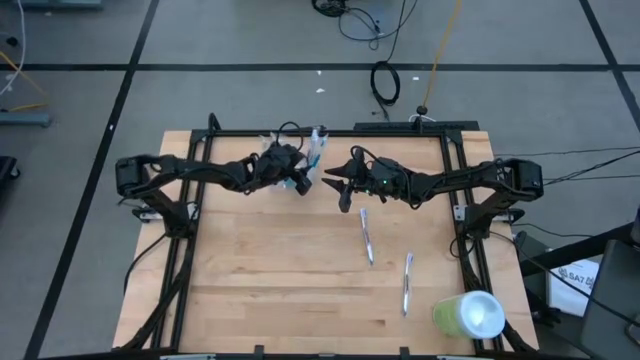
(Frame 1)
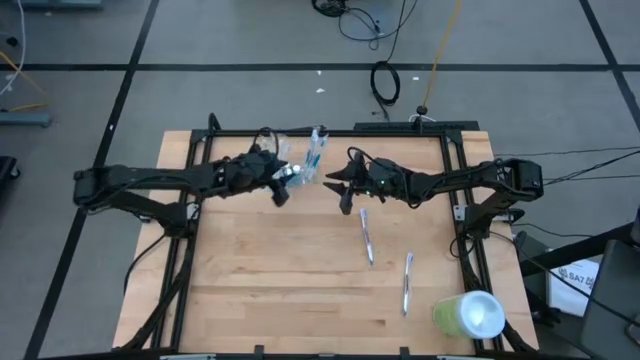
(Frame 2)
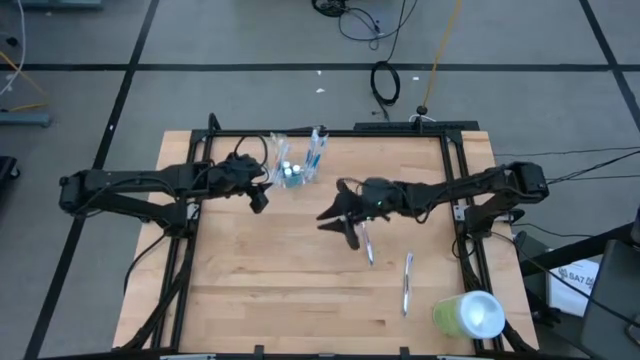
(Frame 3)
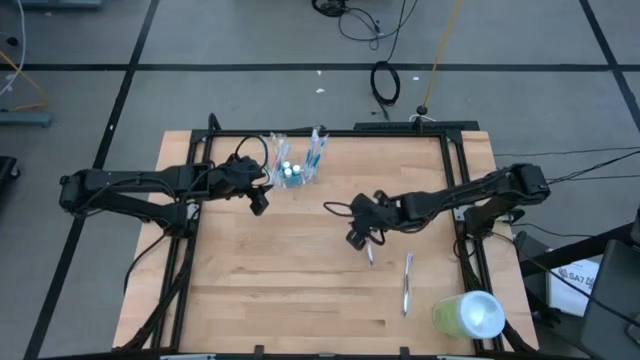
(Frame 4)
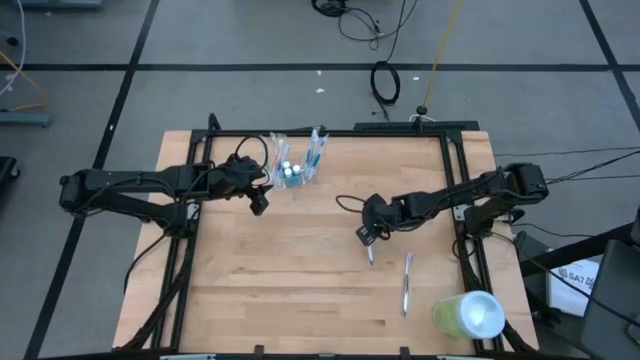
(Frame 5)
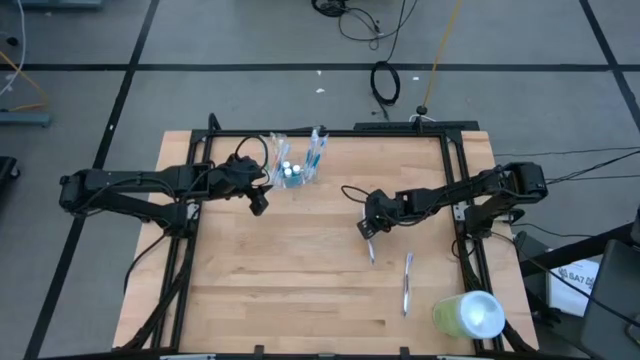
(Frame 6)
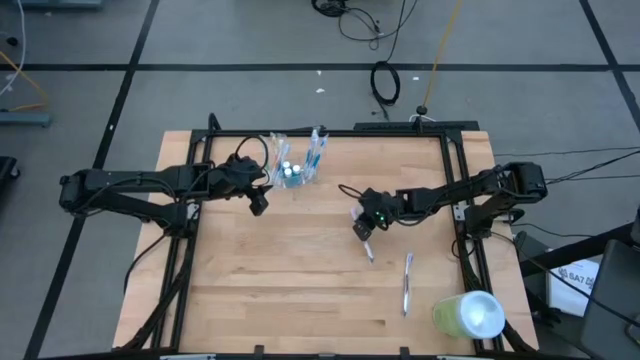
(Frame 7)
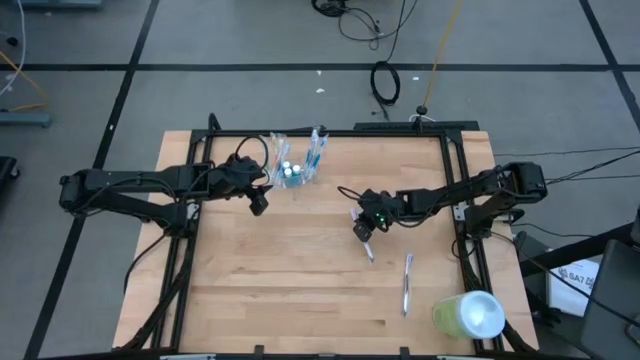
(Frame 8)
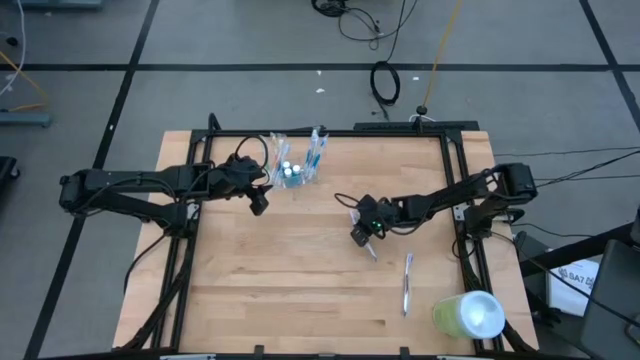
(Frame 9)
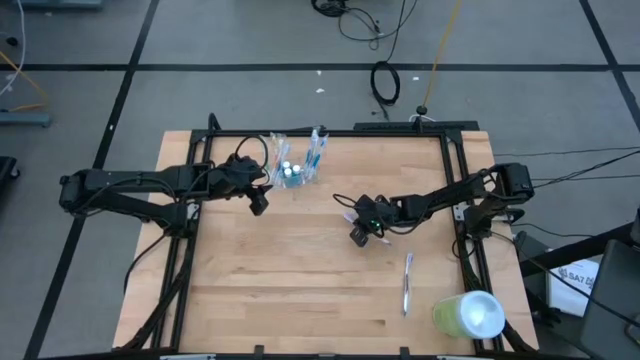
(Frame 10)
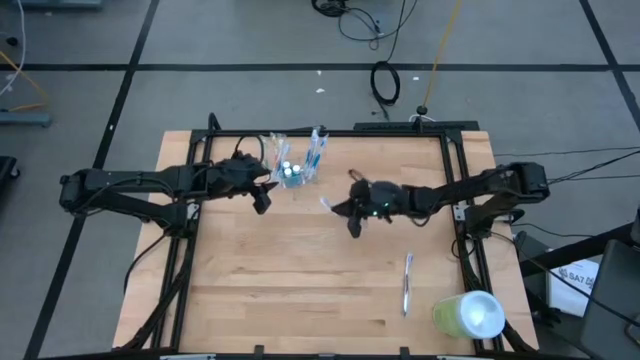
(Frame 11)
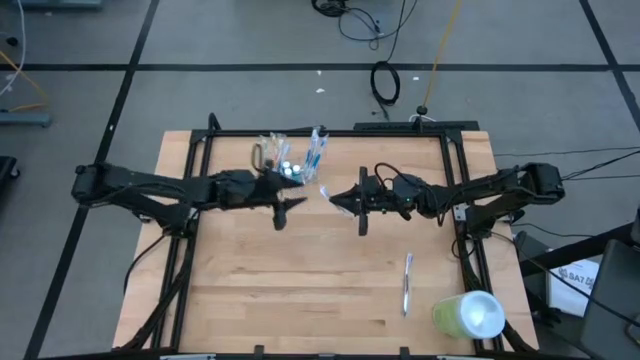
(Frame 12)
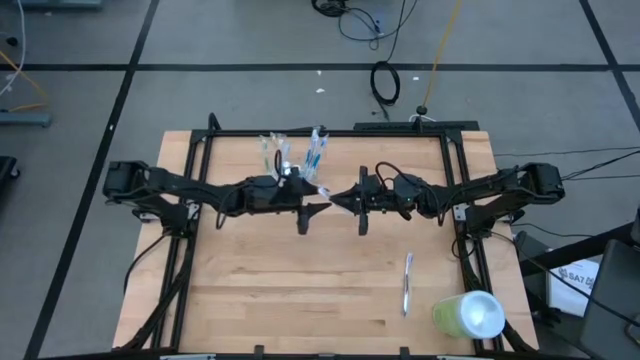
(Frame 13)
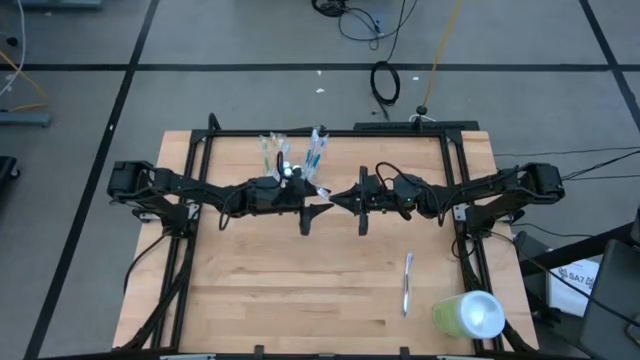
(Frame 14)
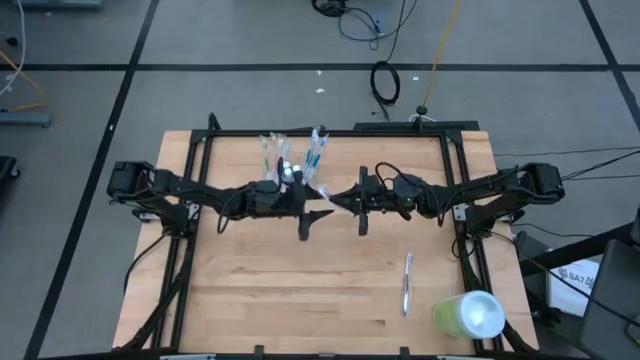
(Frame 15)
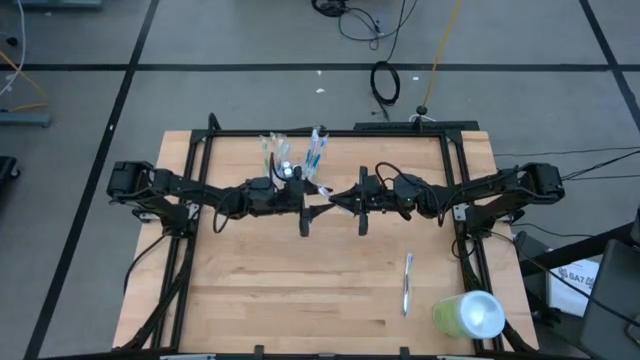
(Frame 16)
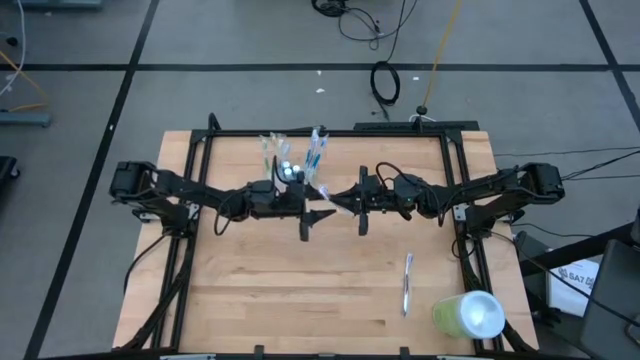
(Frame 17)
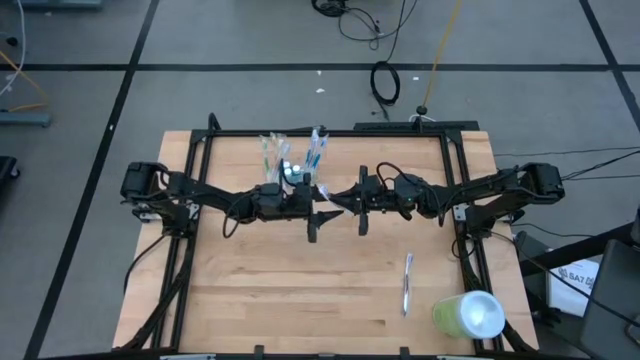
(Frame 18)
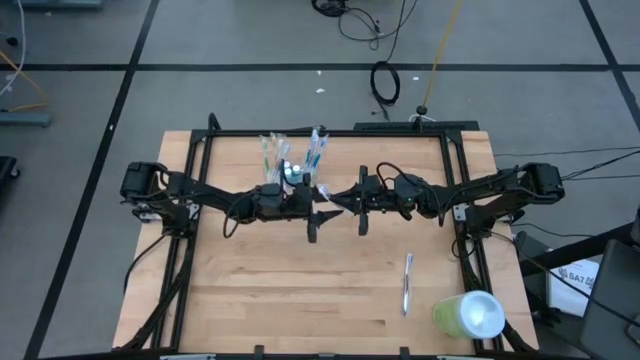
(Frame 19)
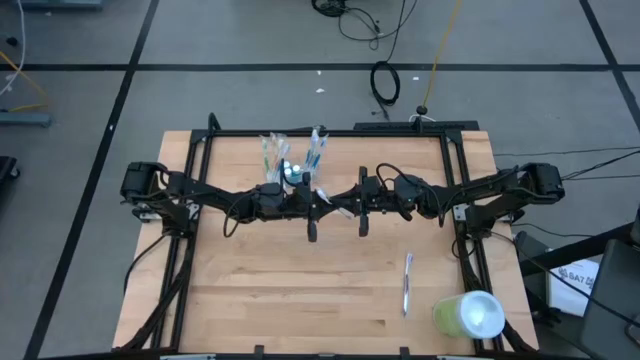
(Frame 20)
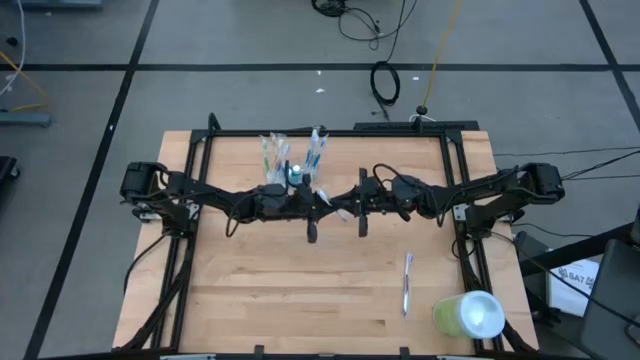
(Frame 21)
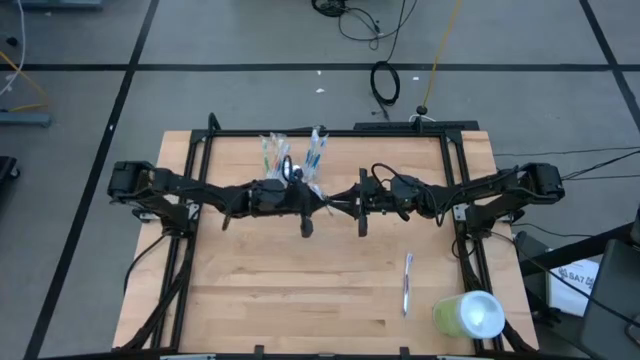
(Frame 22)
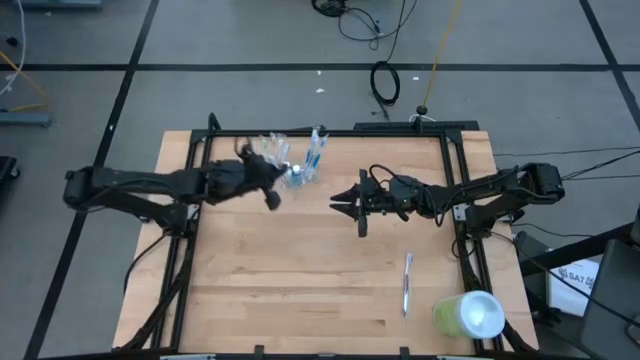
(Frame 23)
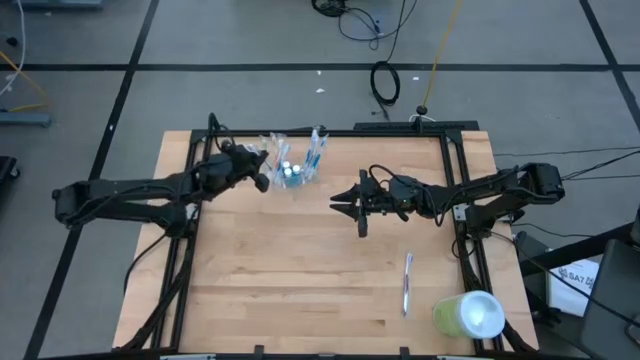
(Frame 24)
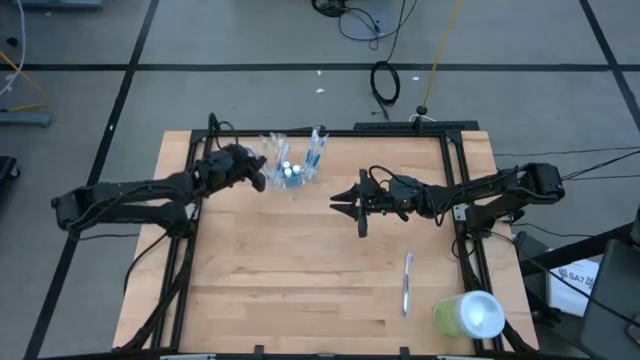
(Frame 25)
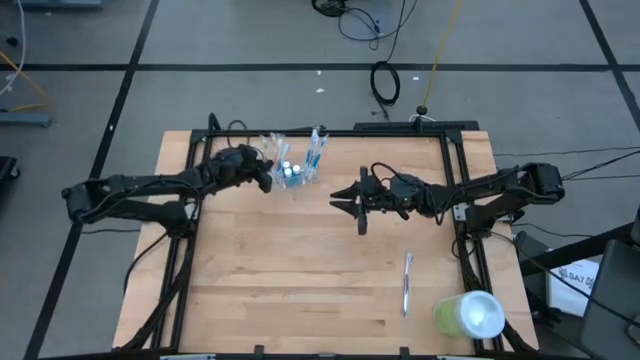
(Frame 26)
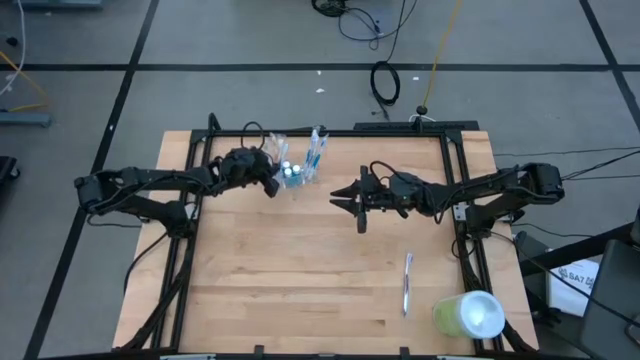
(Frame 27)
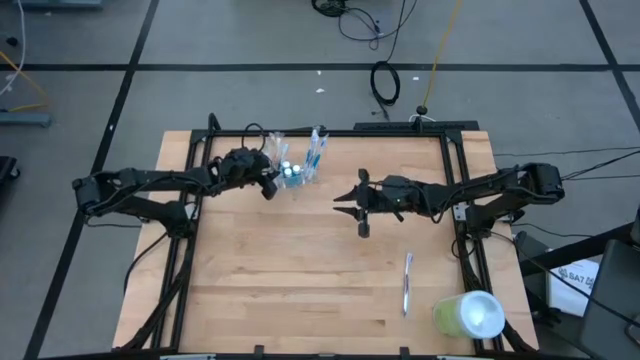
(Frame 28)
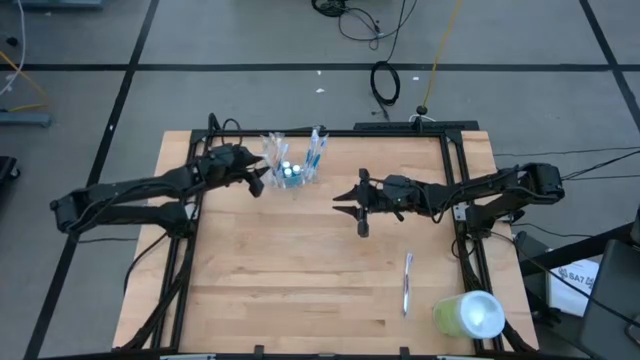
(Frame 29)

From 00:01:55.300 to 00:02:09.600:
Task: Pick & Place toothbrushing station
Put the left purple toothbrush into the transparent organizer

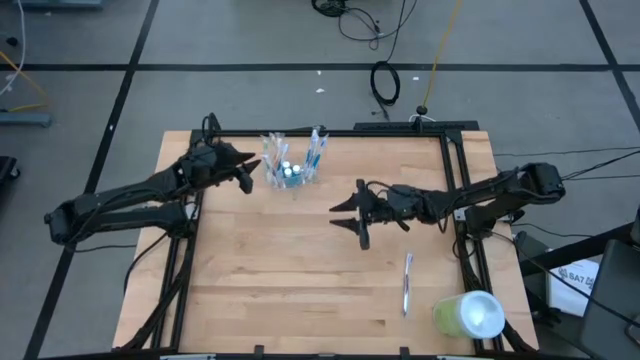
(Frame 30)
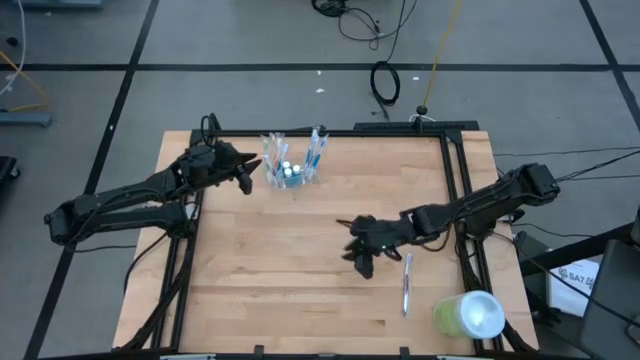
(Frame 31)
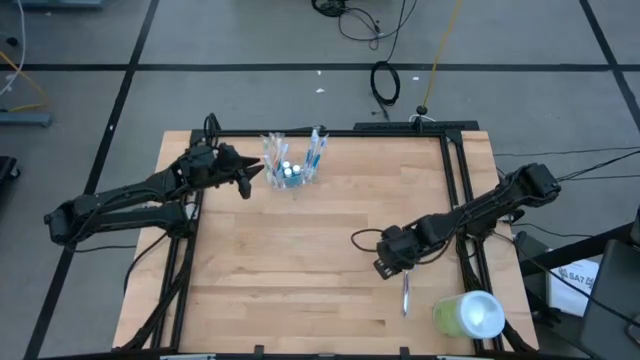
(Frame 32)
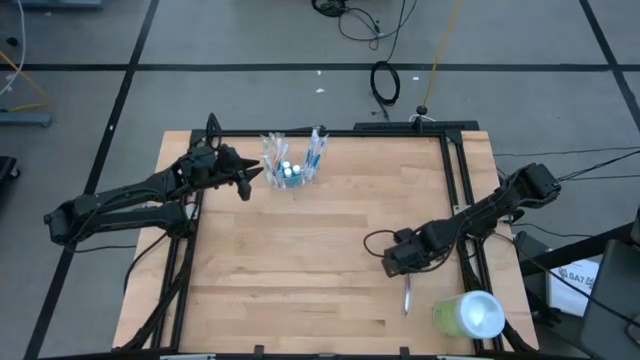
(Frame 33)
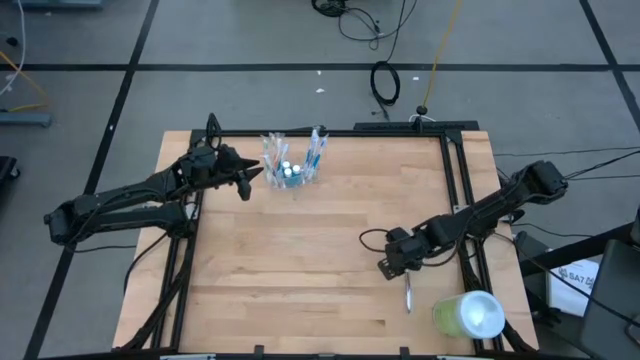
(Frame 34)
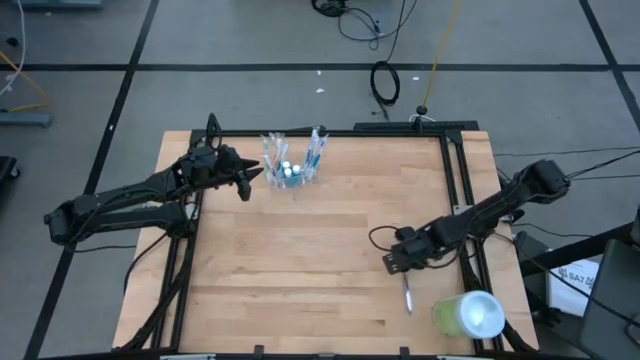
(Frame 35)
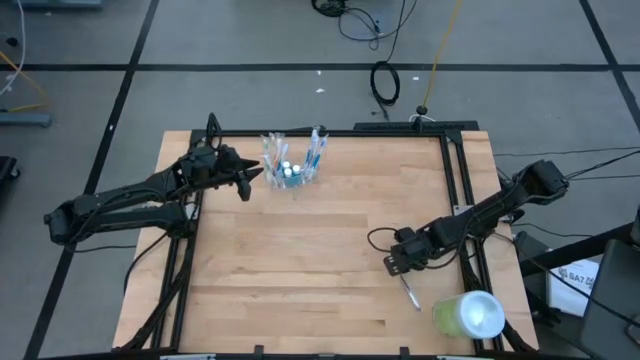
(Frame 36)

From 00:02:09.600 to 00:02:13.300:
Put the purple toothbrush into the transparent organizer

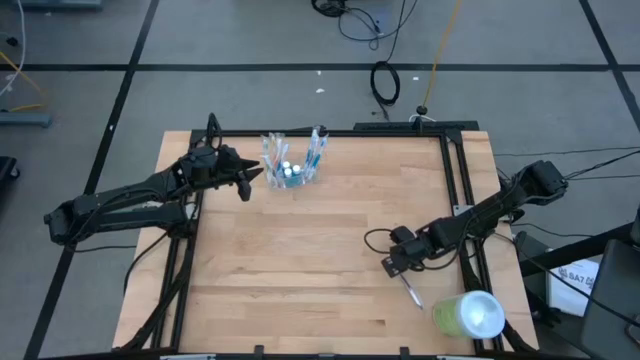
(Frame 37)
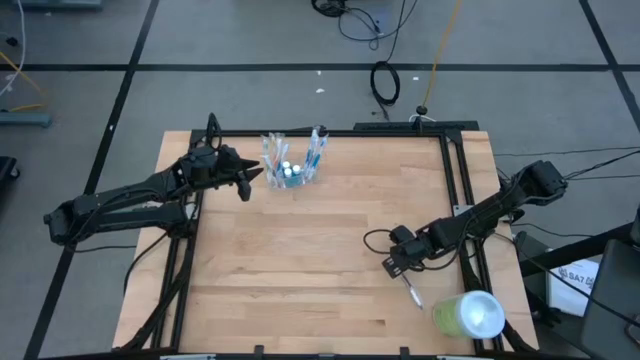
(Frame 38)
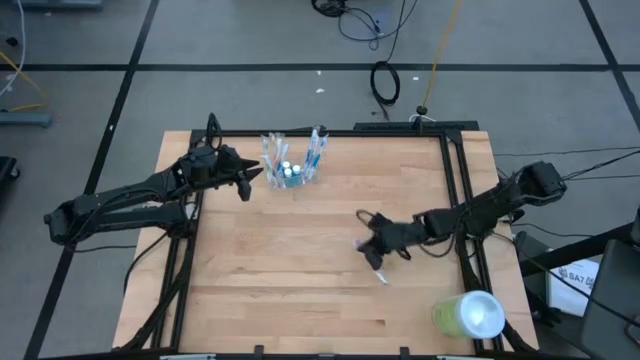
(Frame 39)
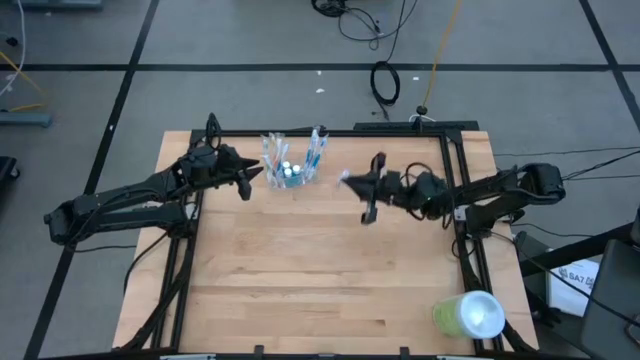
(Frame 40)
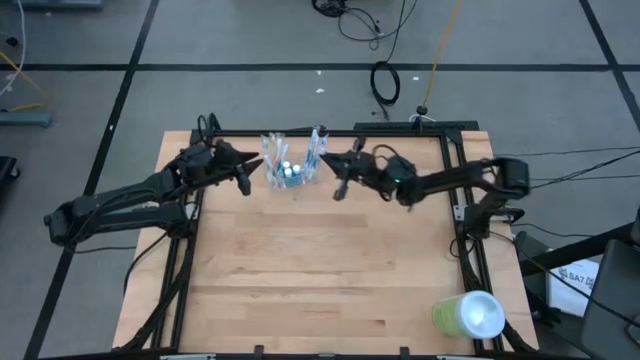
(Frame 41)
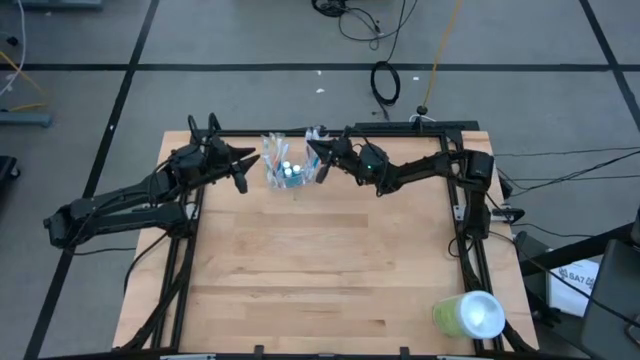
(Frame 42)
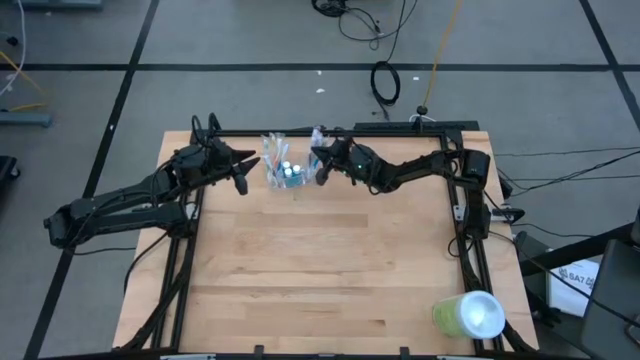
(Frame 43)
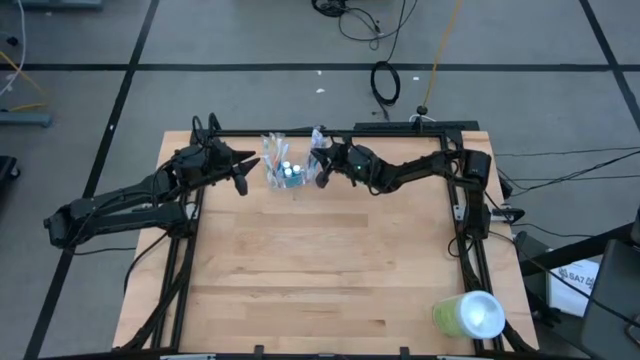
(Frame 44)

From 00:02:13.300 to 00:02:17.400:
Put the purple toothbrush into the transparent organizer
